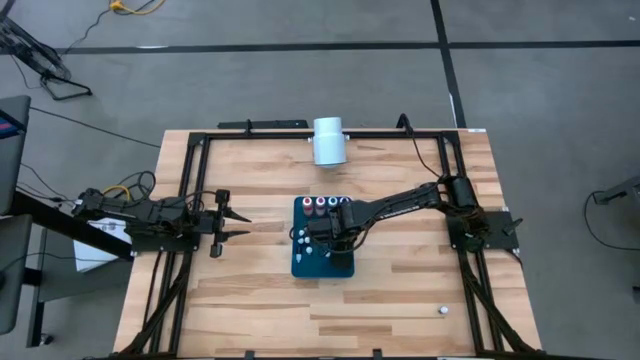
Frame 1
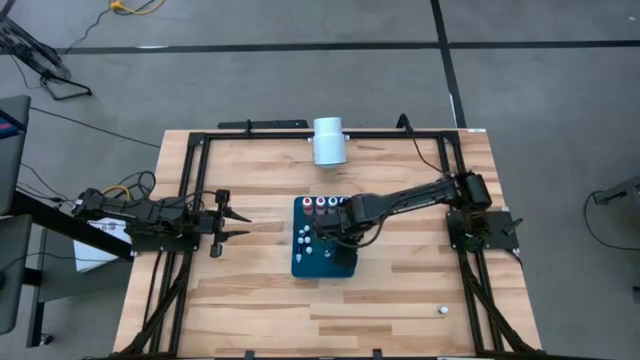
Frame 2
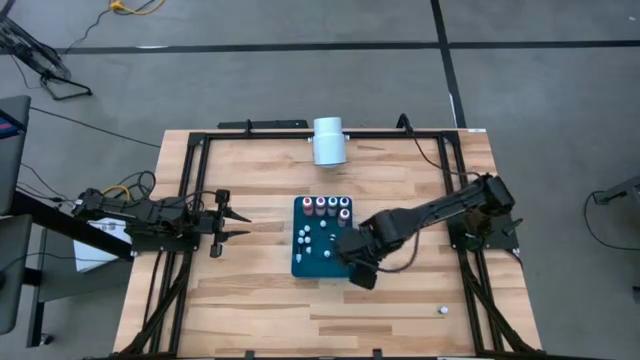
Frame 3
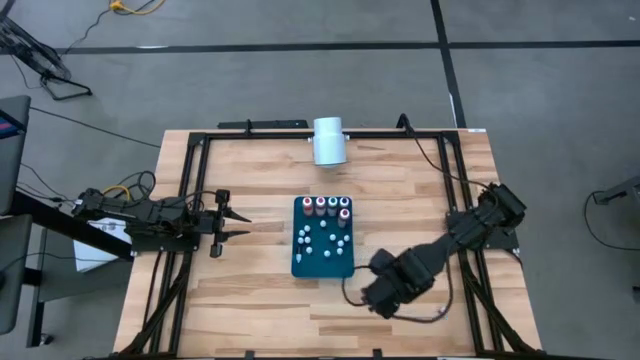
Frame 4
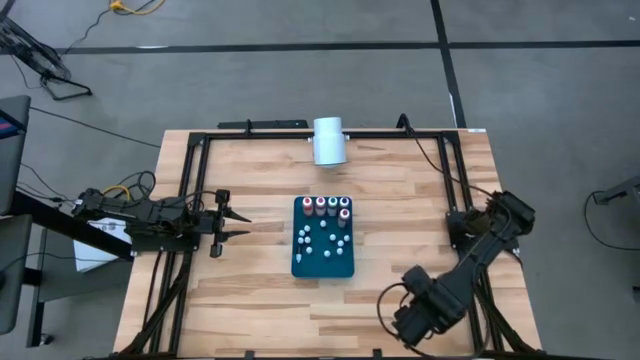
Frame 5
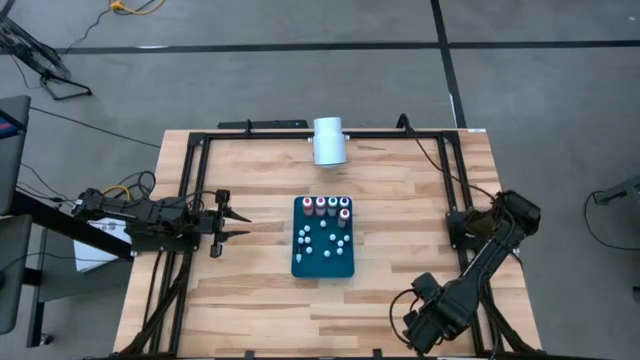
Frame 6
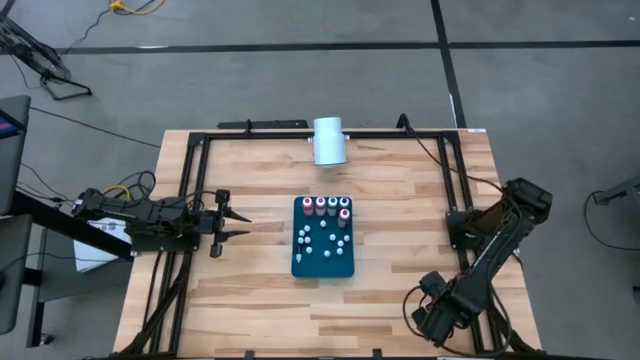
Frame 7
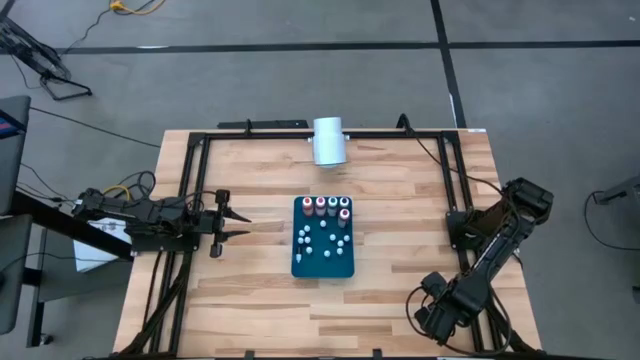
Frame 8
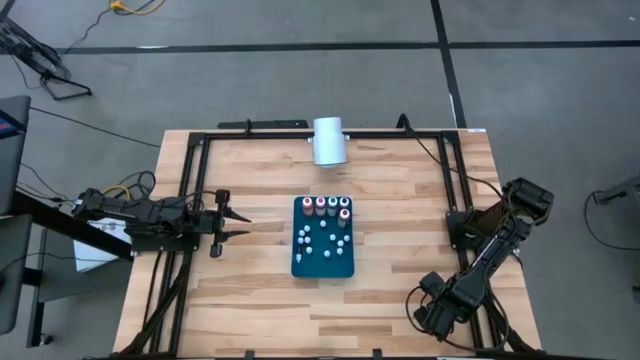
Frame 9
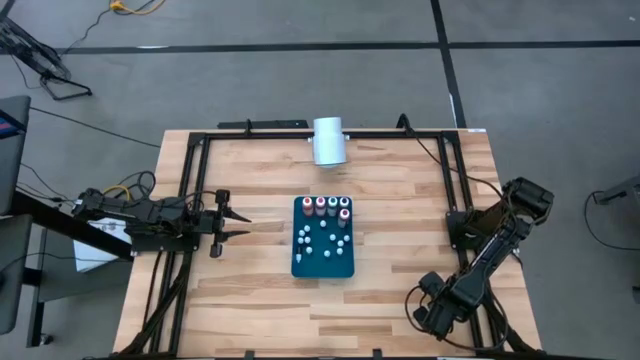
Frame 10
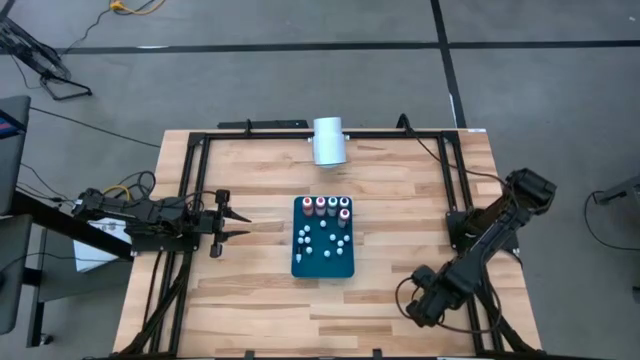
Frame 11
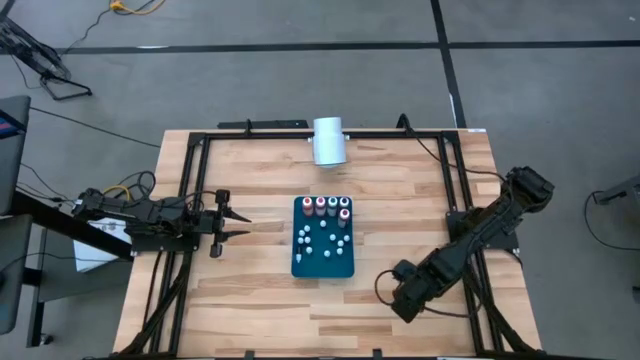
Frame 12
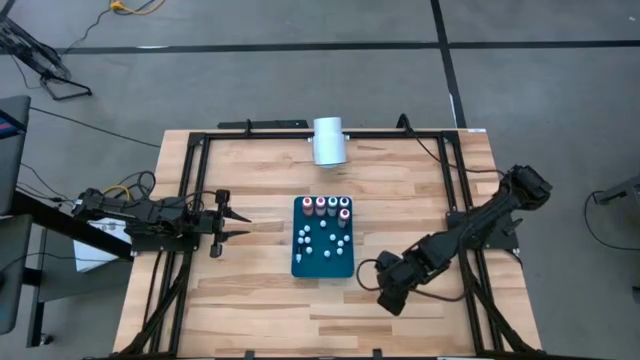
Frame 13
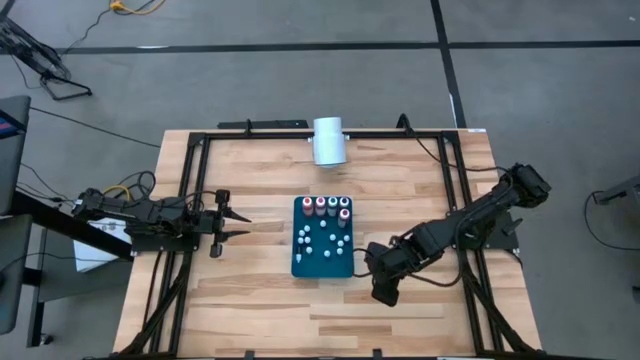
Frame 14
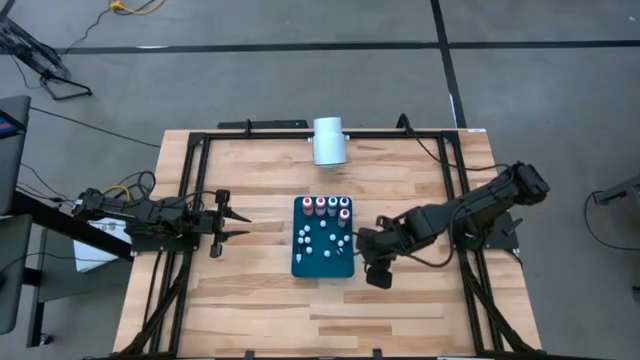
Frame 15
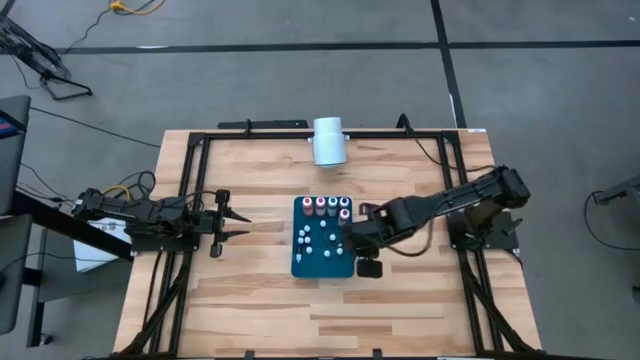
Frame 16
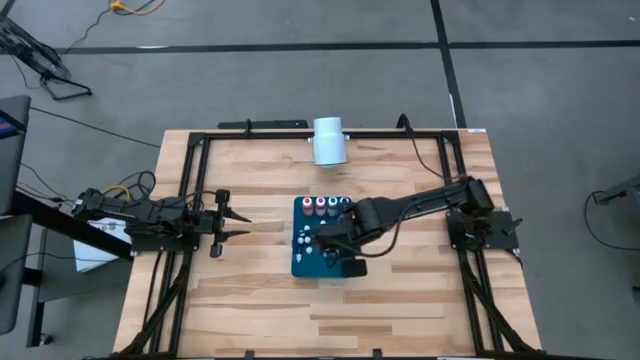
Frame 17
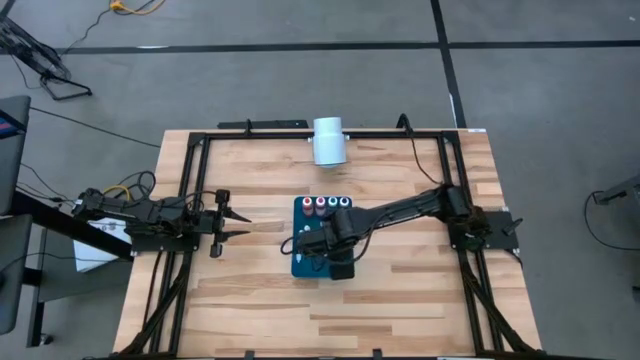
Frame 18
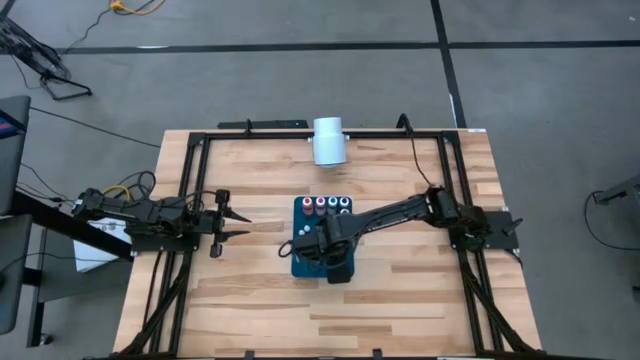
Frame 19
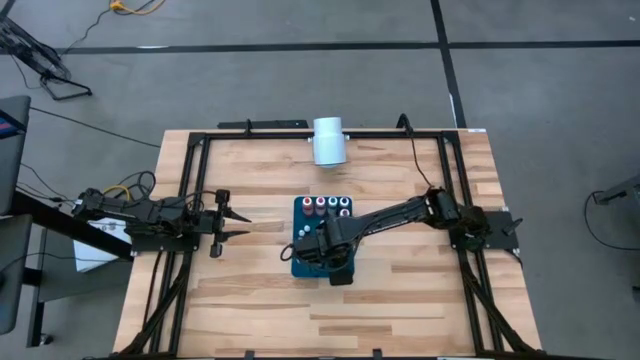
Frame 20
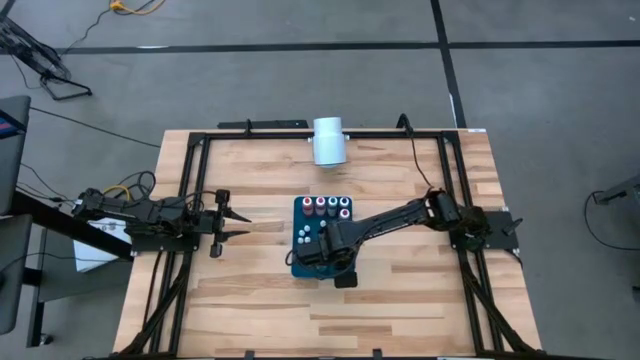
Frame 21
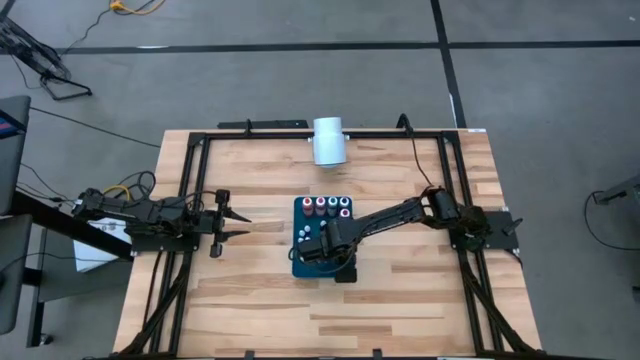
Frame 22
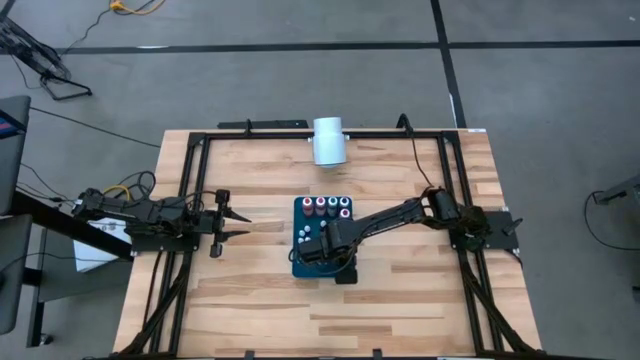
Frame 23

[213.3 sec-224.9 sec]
Task: Pick & Place food coloring
Put the small black food coloring bottle into the blue bin

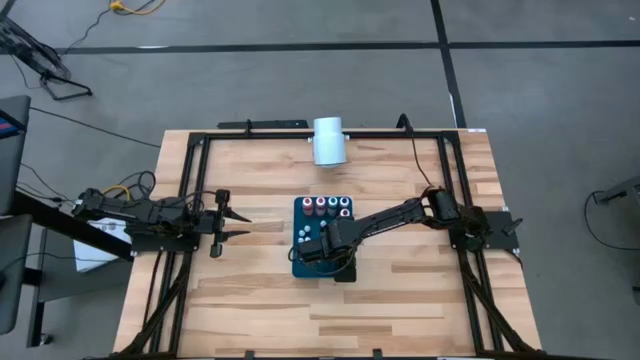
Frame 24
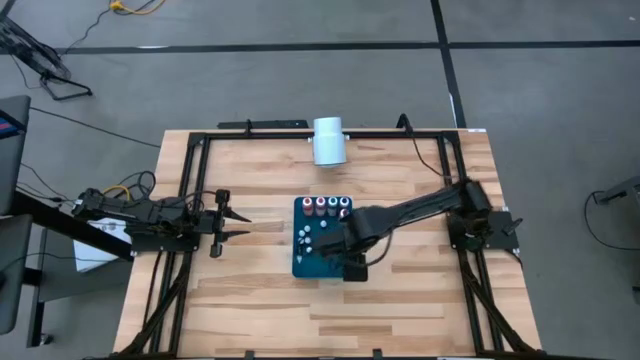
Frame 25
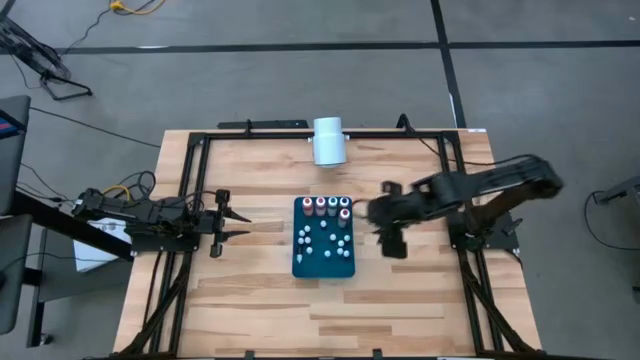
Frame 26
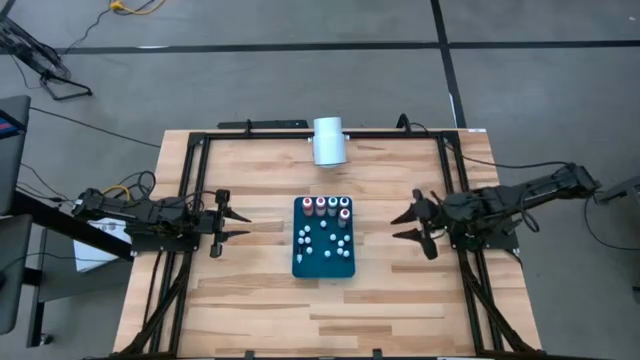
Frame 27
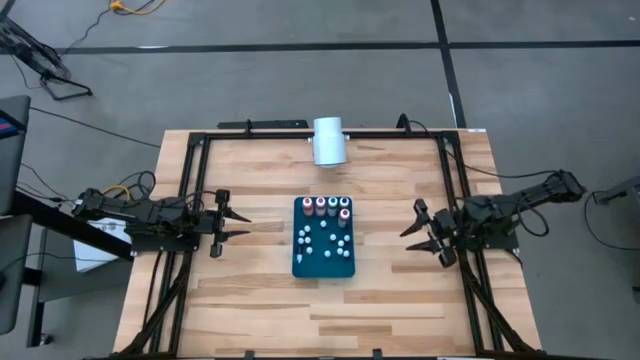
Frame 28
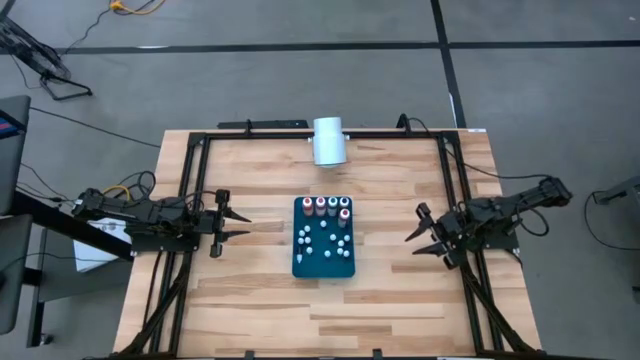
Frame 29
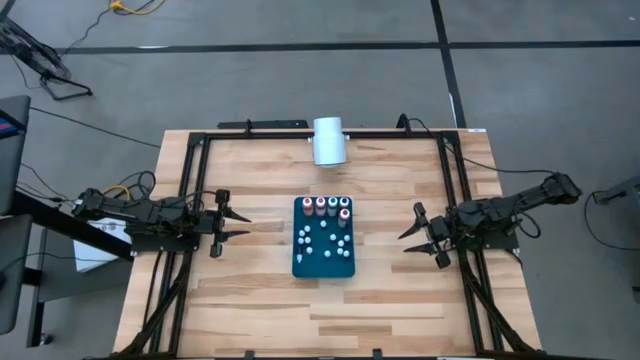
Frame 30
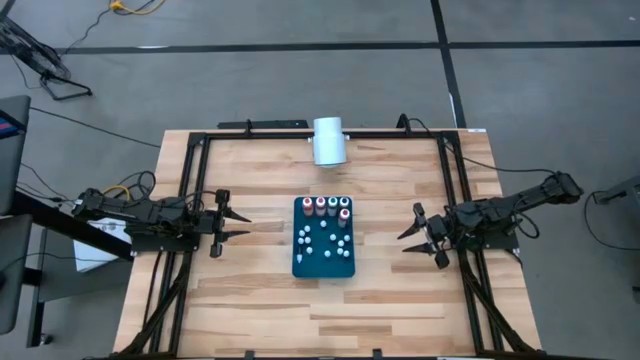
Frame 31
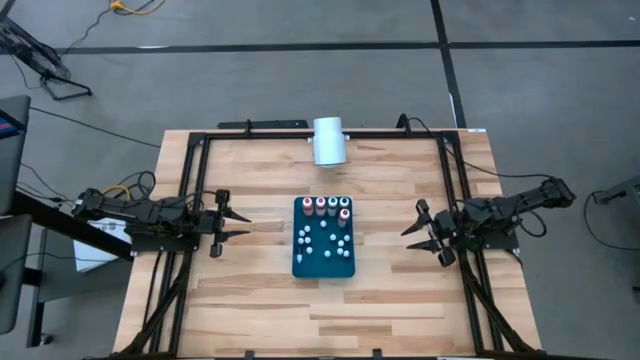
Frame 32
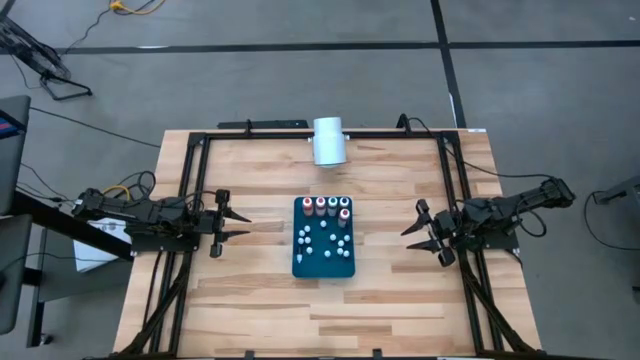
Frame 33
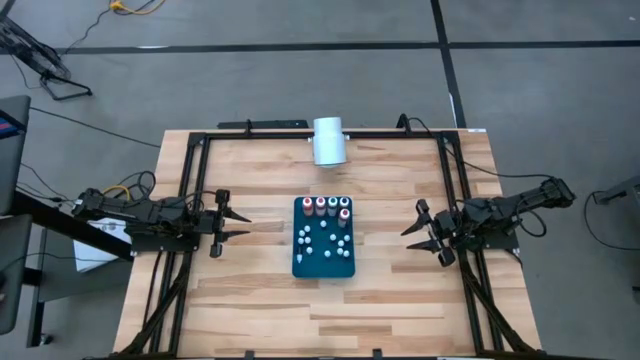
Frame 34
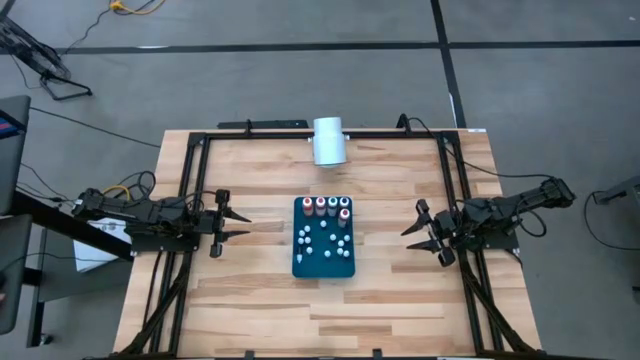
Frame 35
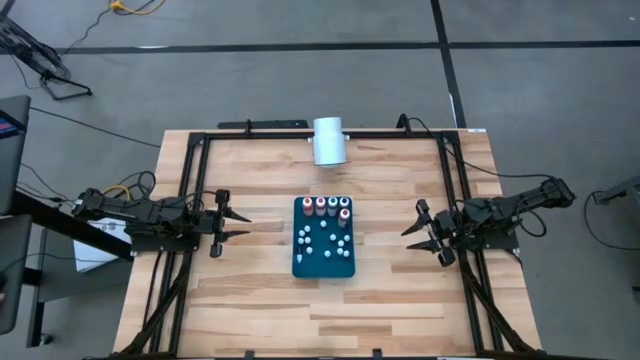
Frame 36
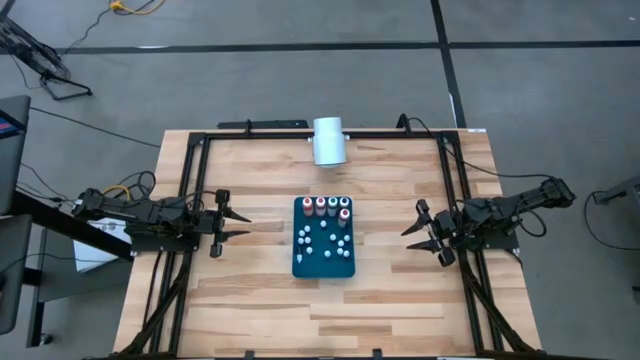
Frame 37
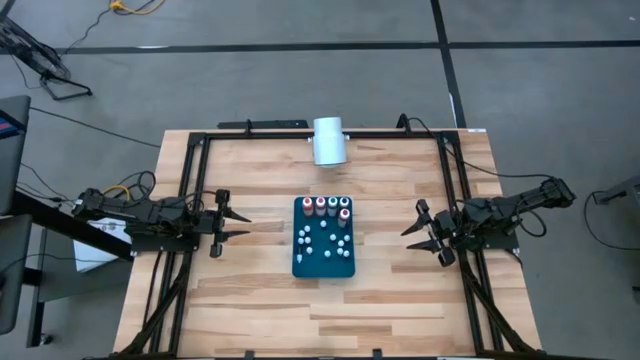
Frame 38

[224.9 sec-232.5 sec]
Return to Home Position

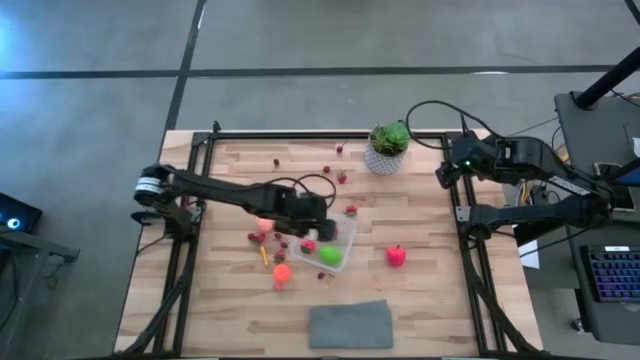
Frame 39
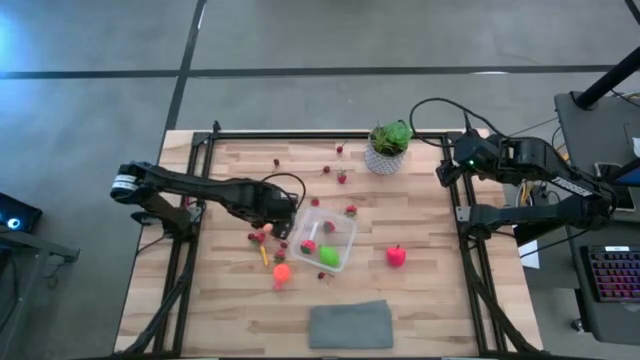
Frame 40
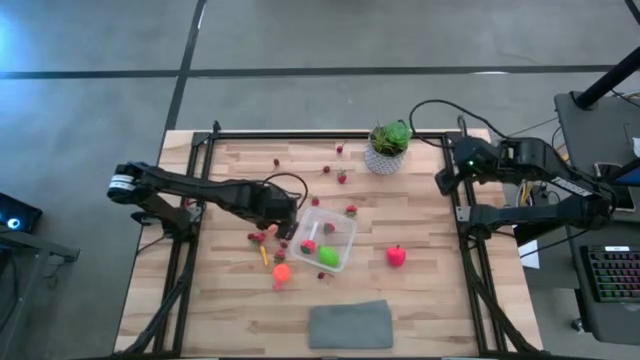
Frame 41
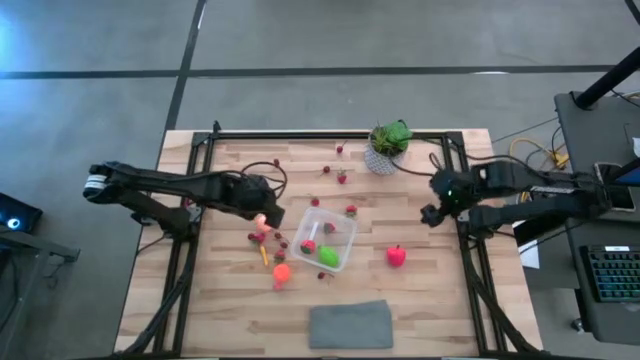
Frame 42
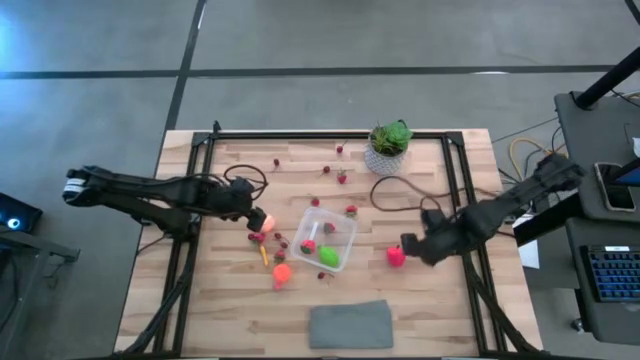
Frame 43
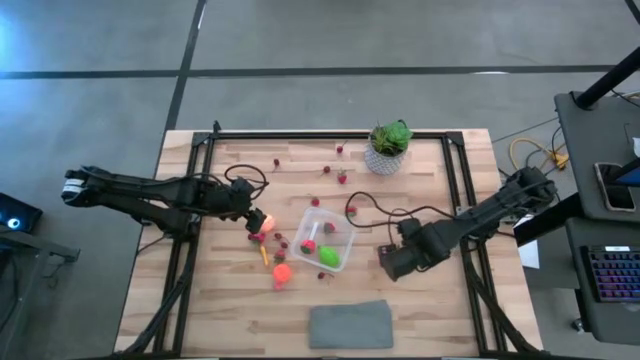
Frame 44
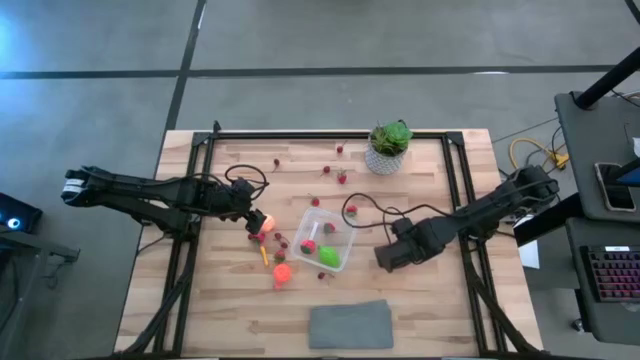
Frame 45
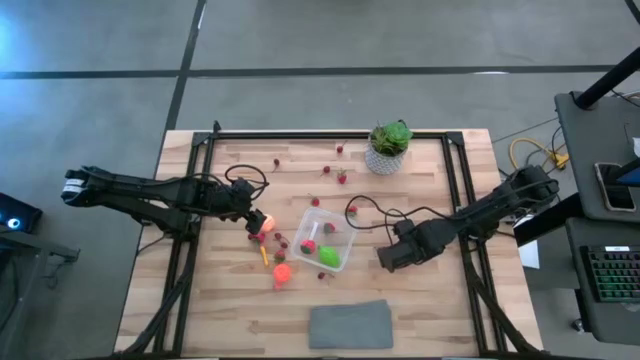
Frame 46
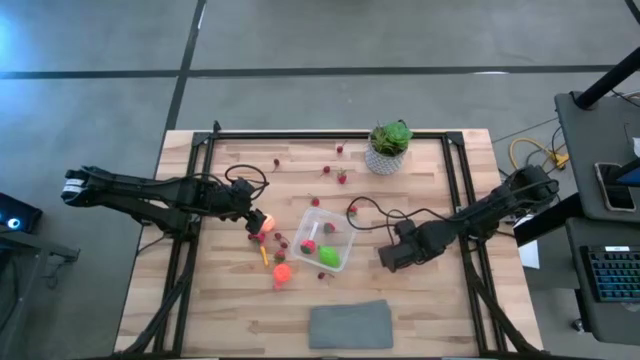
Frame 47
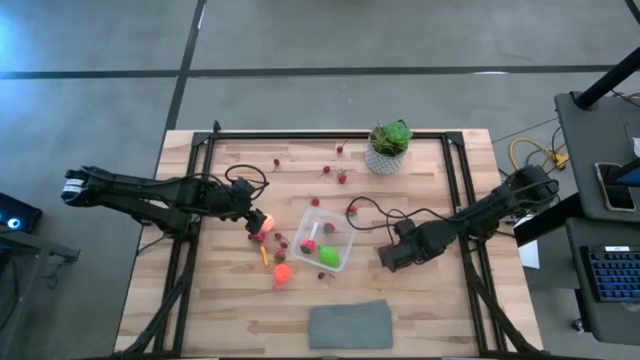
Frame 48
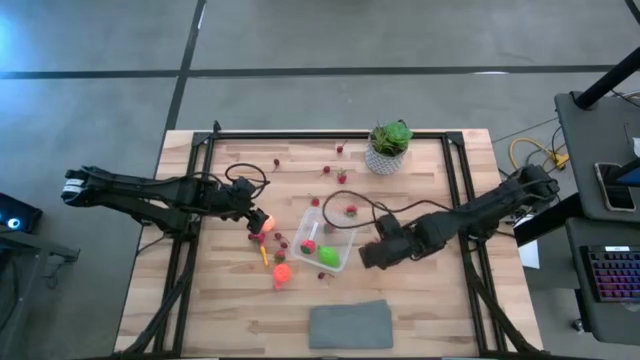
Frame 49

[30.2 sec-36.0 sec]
Task: Pick and placing Produce into tupperware
Put the apple into the transparent container
